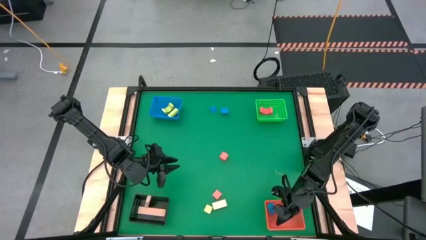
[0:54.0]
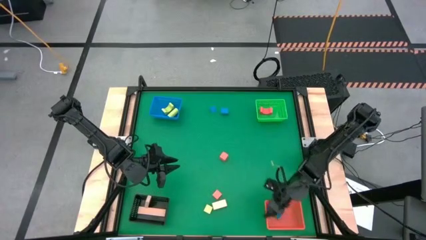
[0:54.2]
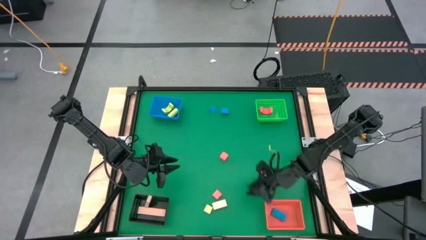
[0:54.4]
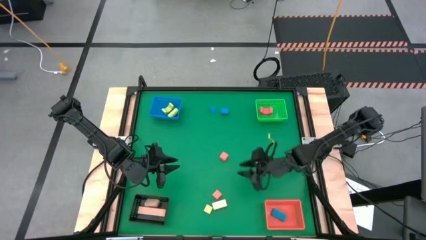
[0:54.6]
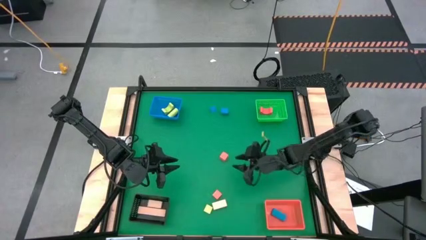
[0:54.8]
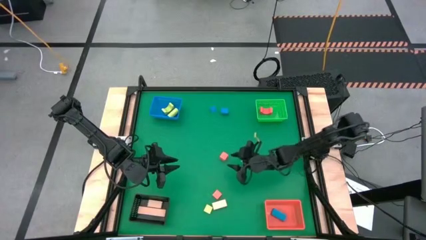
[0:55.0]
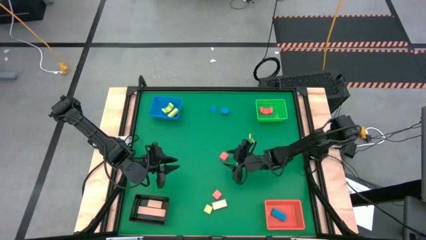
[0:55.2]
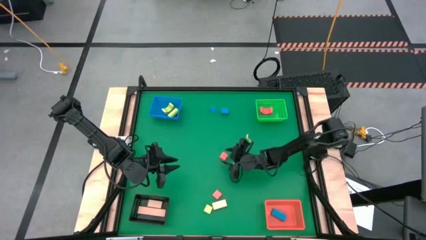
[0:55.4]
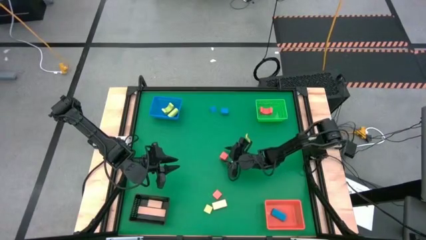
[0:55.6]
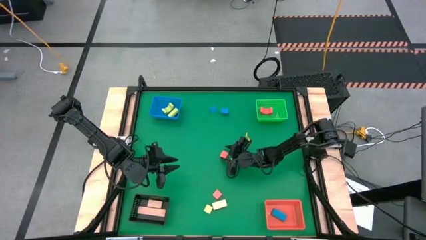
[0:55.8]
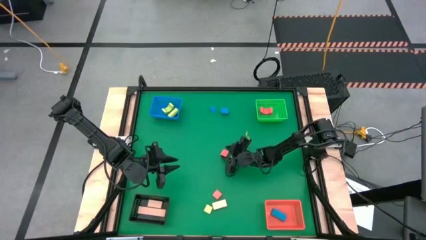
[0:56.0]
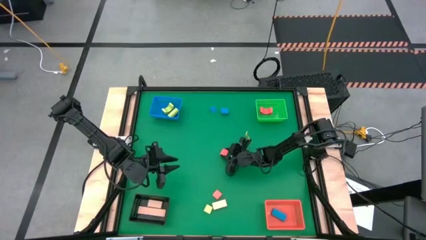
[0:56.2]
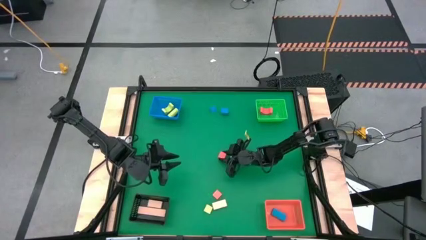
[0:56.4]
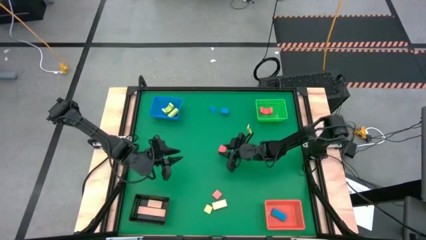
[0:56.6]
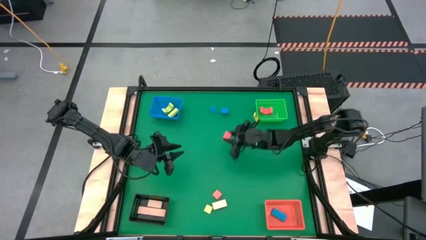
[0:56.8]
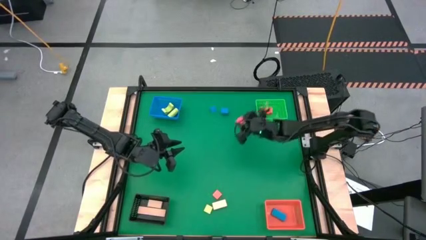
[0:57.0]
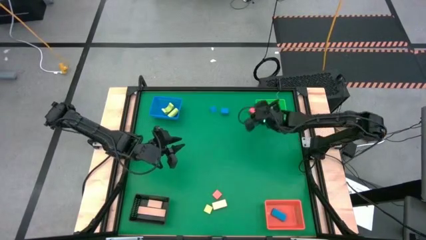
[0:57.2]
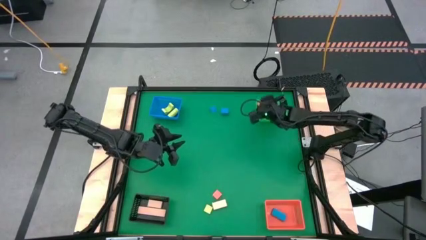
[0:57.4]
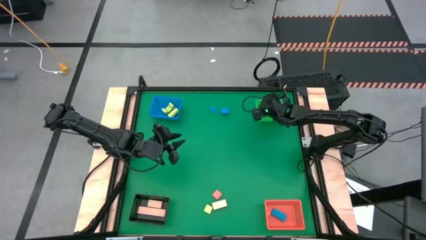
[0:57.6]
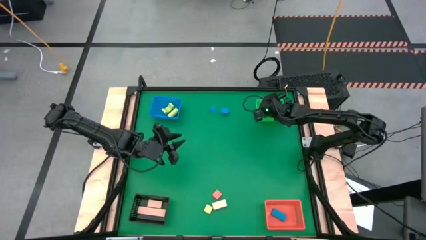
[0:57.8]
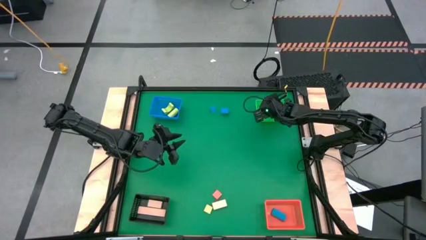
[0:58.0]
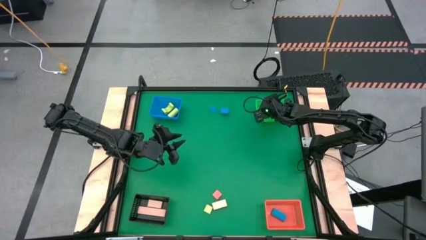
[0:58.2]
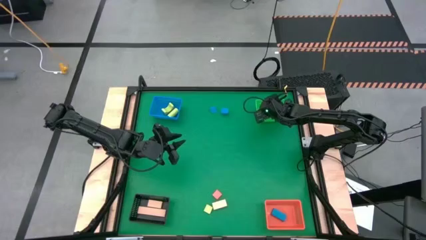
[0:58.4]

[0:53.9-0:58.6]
Task: Sort & place blocks by color
Put the top orange block into the green bin

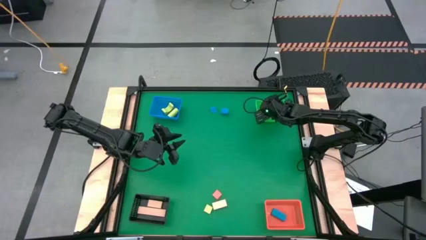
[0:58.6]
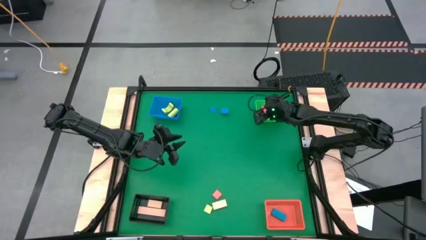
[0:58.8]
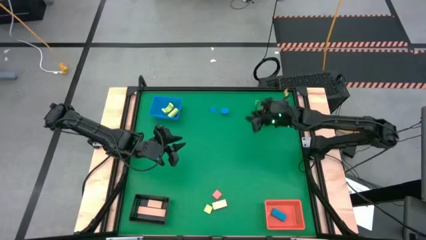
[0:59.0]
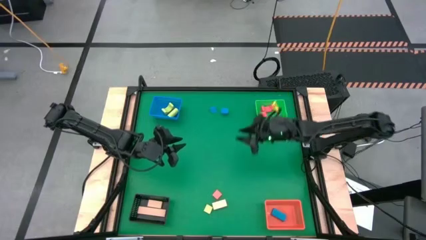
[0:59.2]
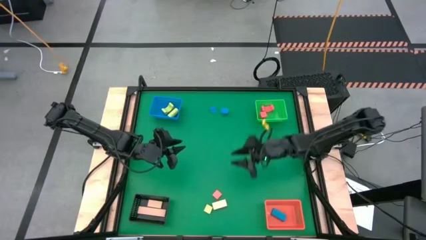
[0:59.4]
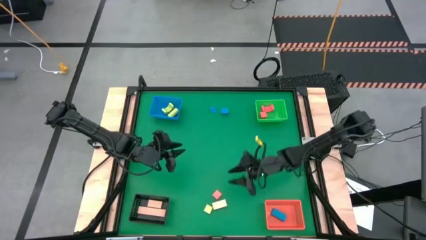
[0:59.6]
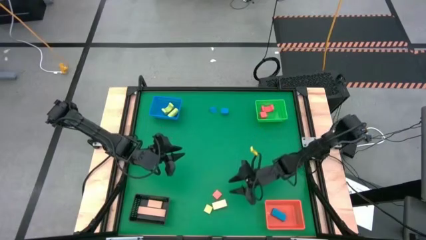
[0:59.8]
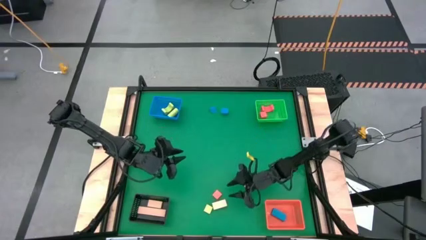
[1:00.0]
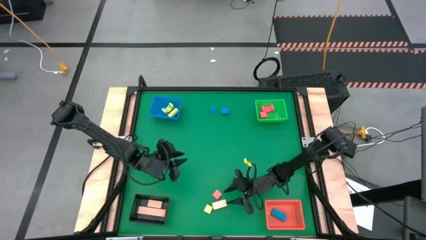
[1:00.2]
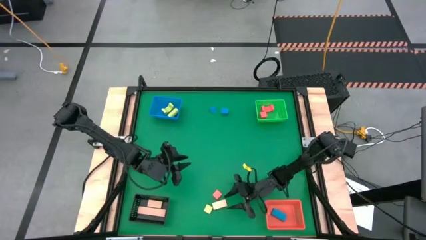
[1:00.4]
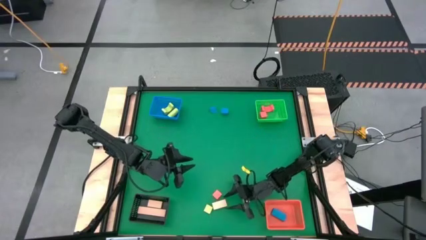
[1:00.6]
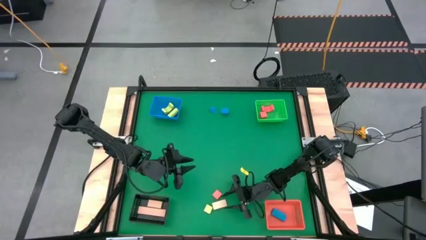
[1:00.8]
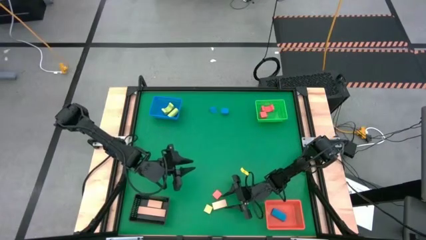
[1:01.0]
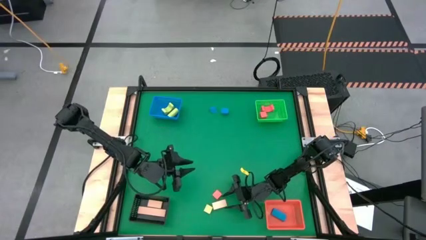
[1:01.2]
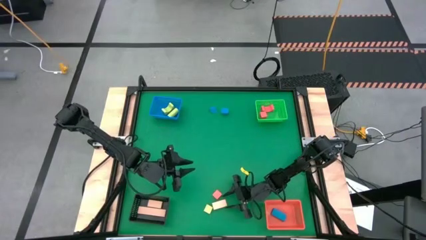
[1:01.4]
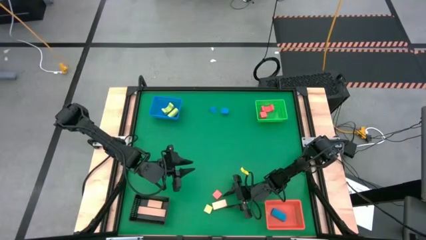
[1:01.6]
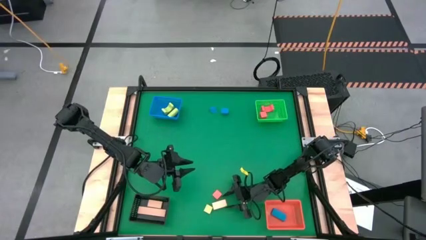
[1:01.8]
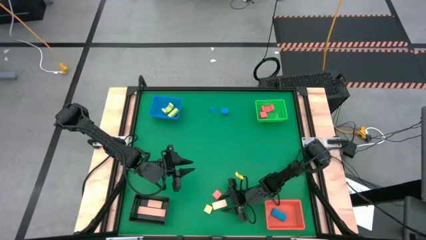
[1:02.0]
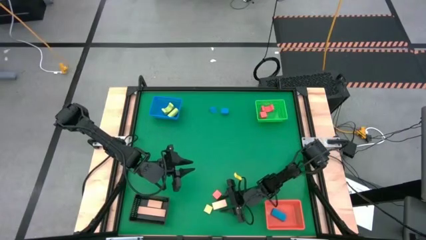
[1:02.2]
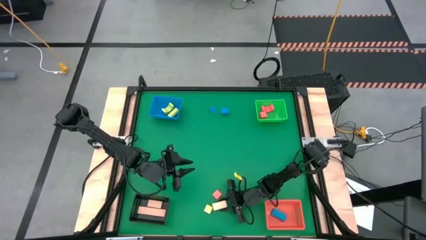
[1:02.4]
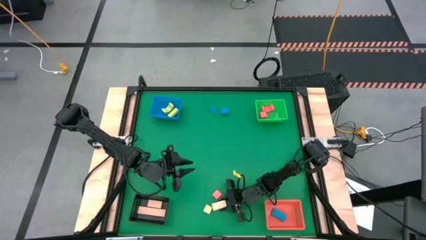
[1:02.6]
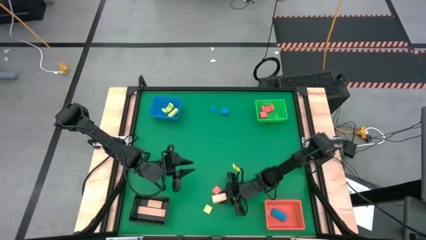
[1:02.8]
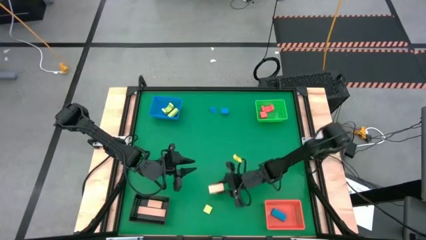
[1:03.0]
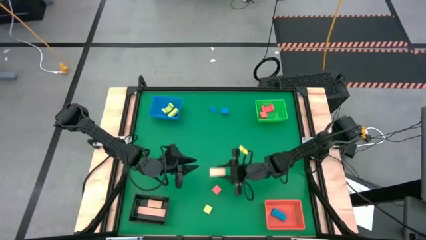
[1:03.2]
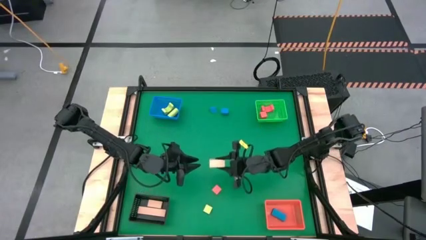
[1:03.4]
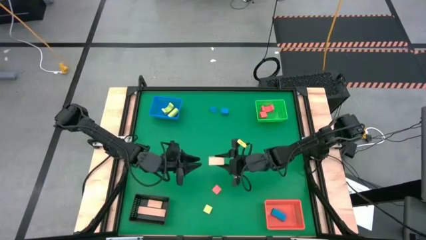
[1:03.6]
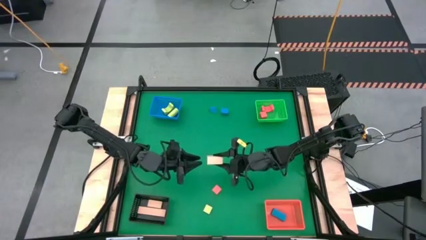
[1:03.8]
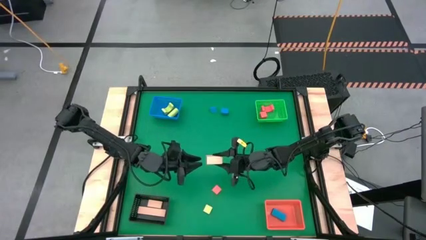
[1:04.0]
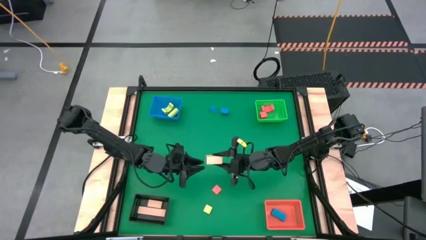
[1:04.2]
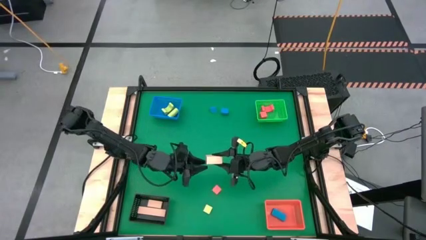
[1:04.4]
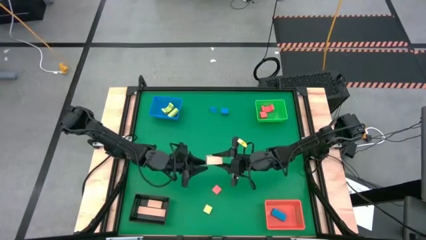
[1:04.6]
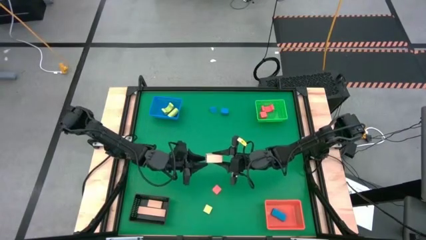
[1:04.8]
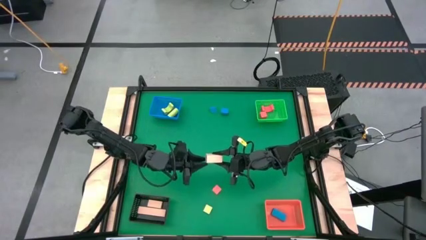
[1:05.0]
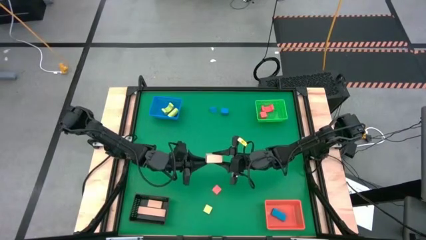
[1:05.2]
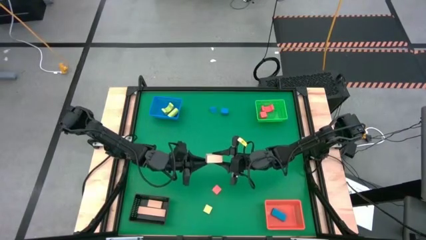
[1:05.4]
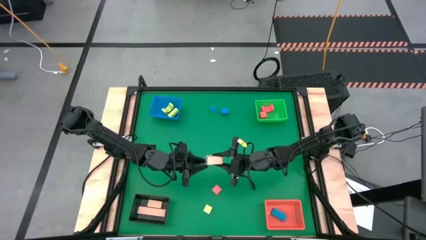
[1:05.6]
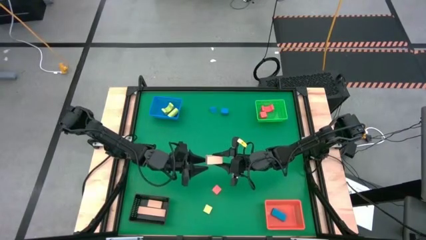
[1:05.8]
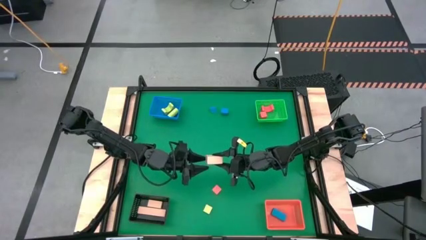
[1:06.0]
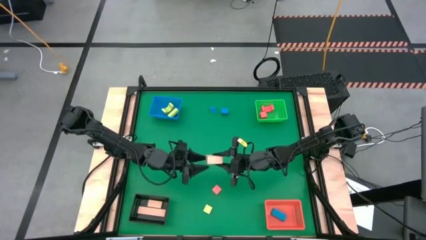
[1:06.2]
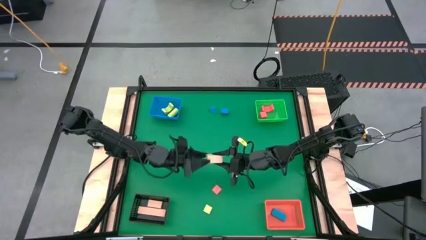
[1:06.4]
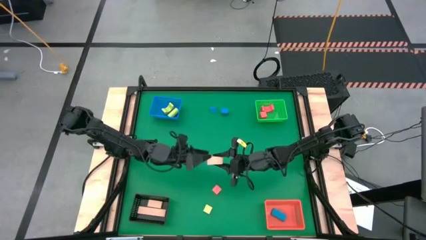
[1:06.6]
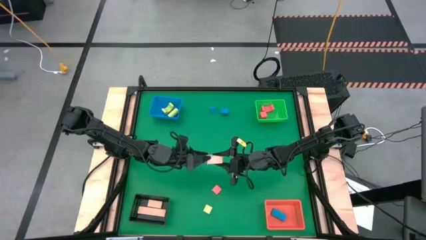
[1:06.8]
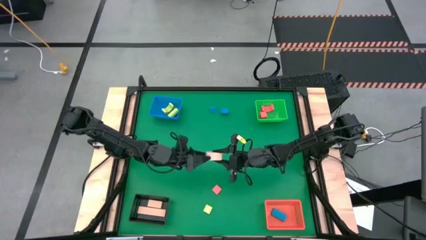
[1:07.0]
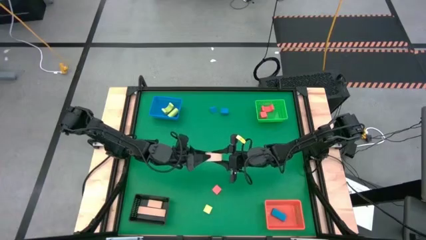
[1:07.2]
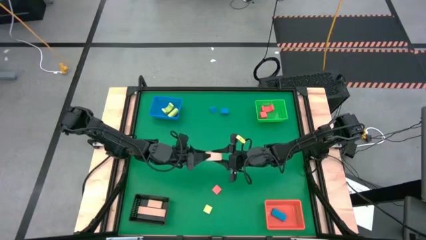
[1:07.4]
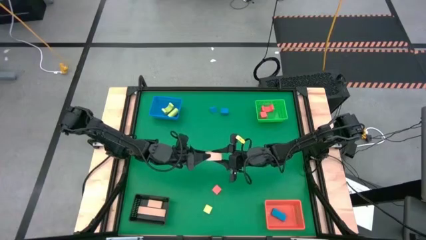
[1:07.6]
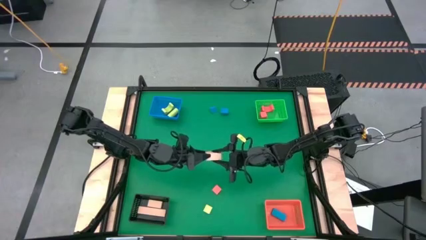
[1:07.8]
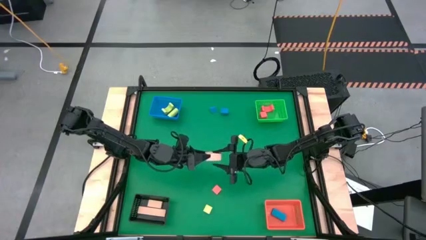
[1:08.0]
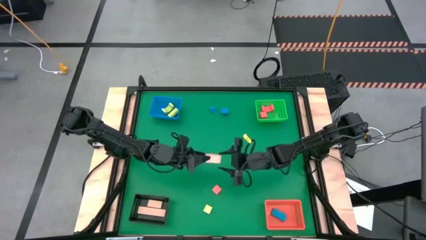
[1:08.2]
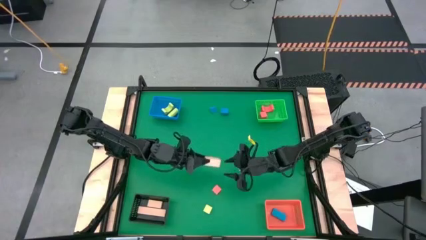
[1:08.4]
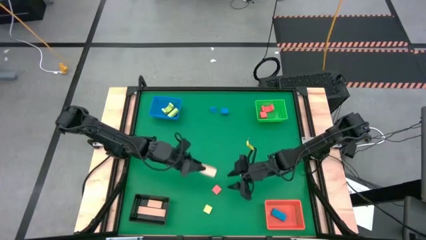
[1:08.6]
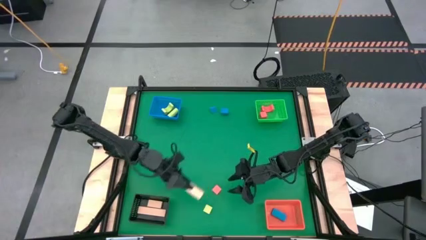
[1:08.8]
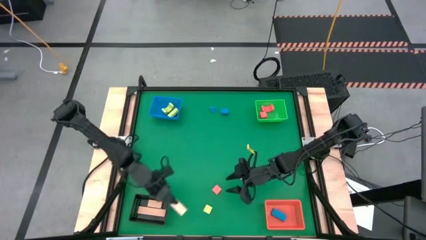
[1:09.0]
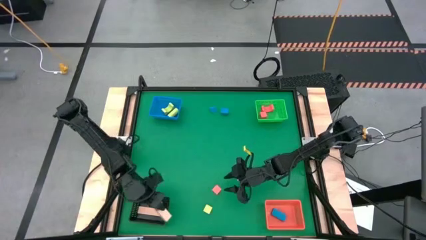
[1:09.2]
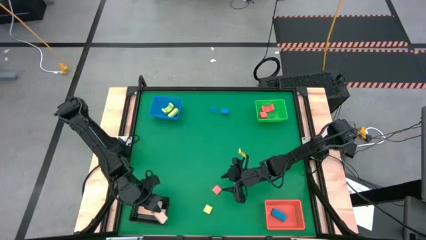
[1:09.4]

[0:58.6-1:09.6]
Put the brown block into the black bin
